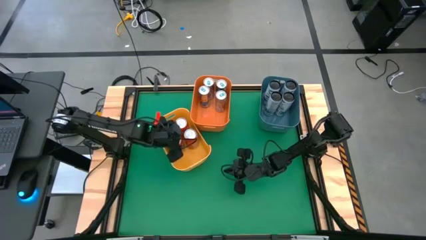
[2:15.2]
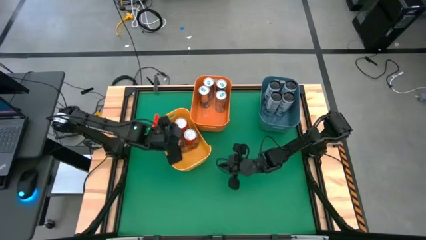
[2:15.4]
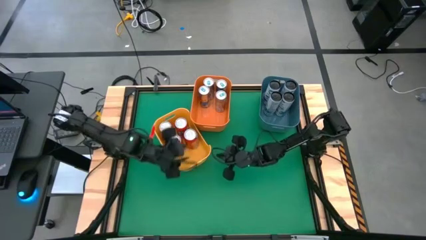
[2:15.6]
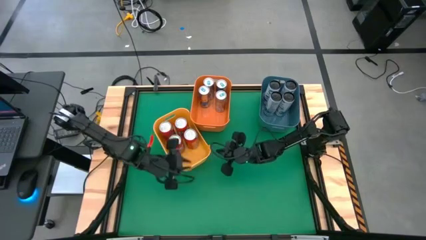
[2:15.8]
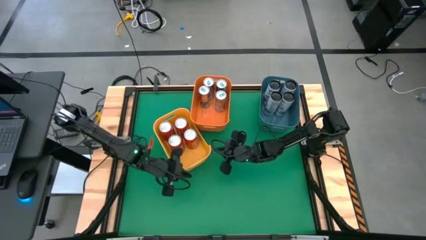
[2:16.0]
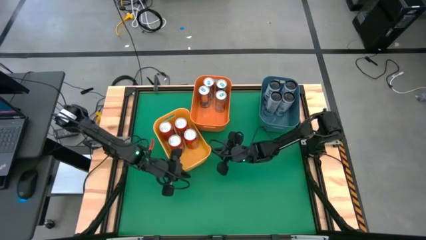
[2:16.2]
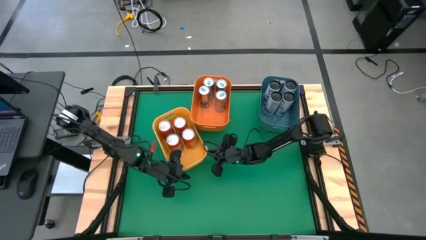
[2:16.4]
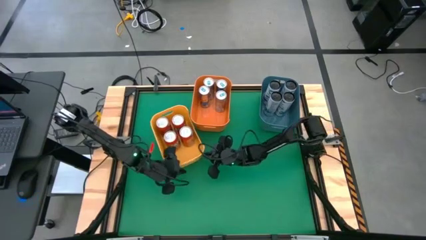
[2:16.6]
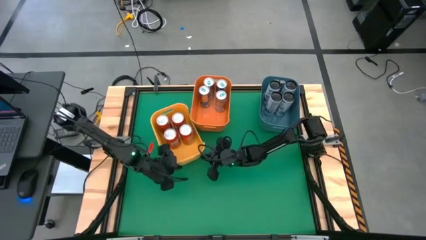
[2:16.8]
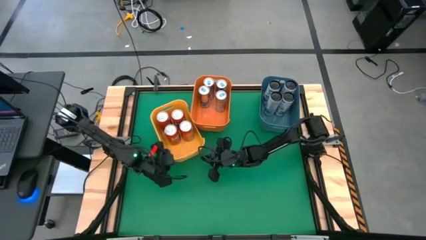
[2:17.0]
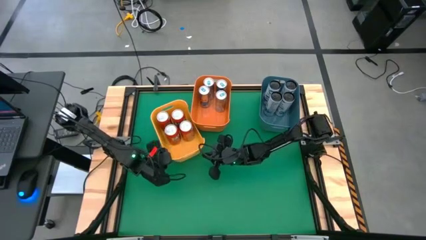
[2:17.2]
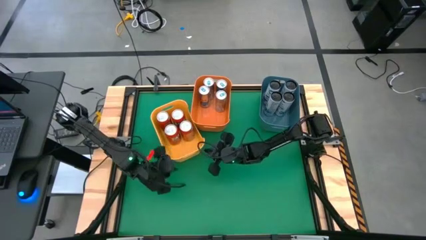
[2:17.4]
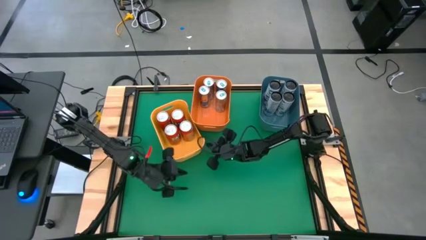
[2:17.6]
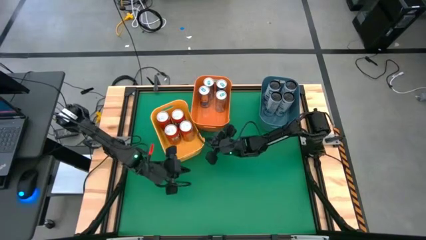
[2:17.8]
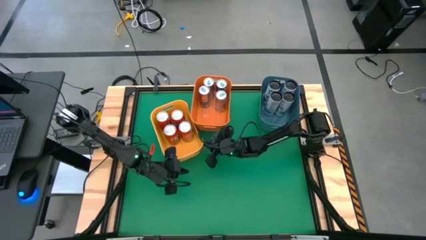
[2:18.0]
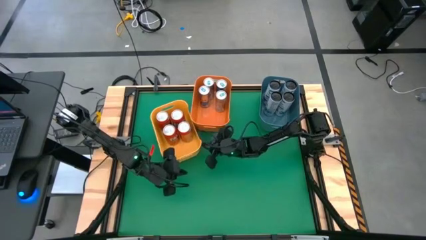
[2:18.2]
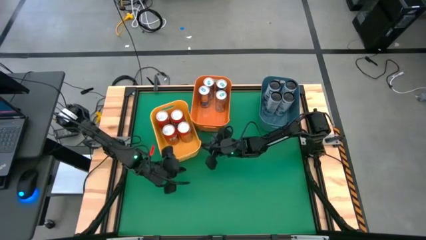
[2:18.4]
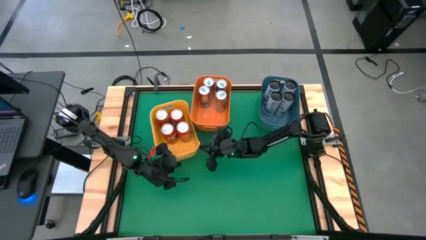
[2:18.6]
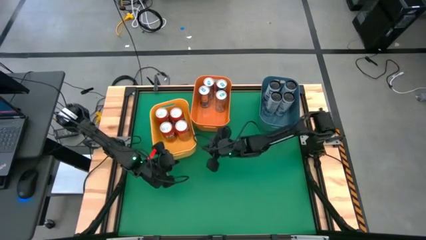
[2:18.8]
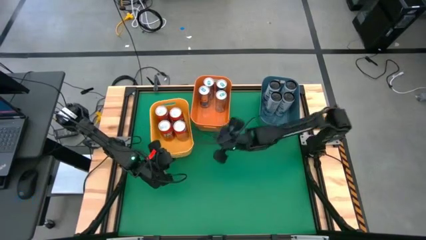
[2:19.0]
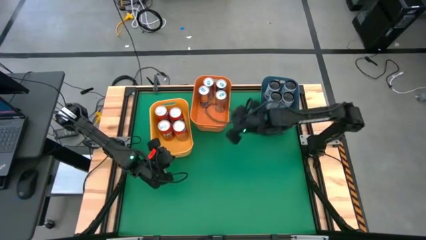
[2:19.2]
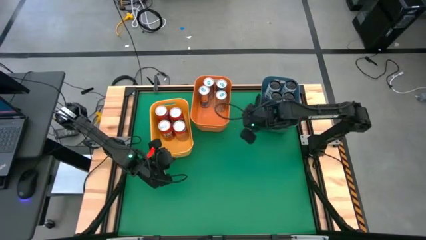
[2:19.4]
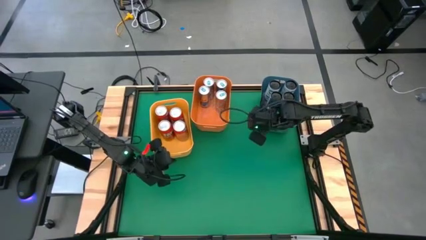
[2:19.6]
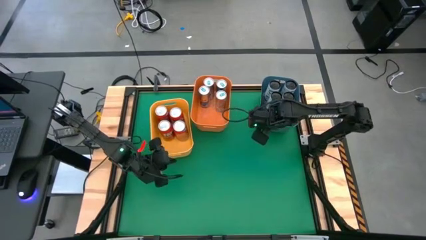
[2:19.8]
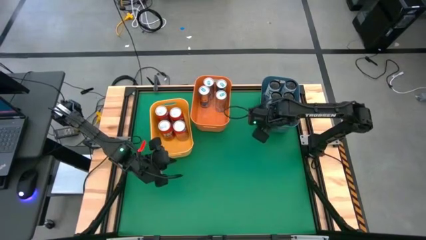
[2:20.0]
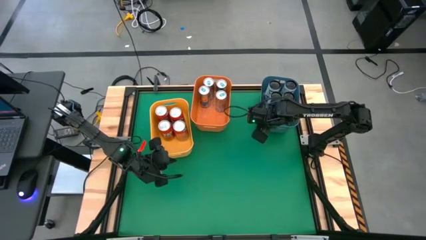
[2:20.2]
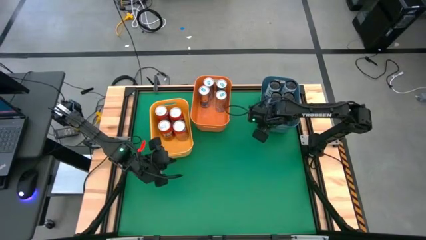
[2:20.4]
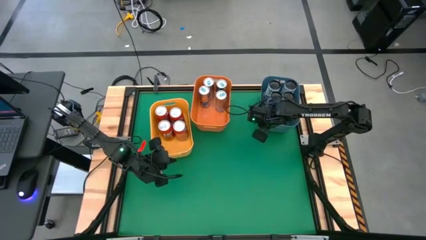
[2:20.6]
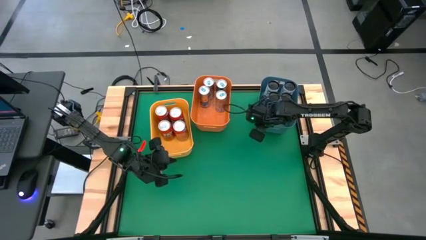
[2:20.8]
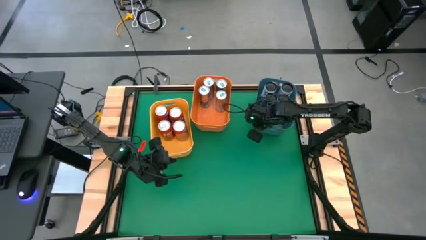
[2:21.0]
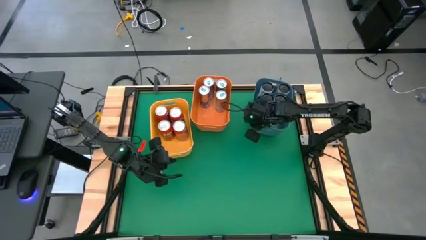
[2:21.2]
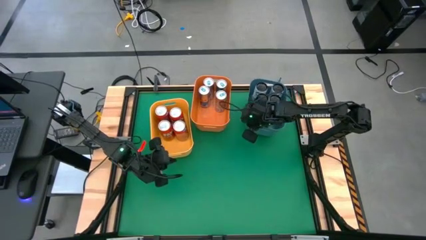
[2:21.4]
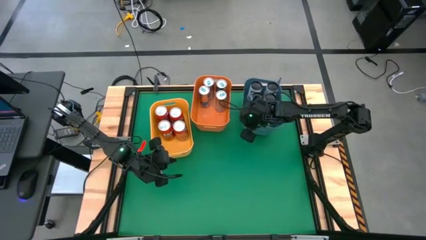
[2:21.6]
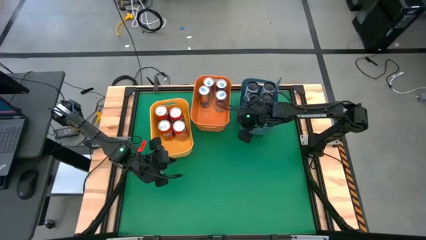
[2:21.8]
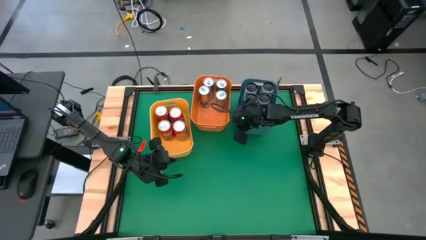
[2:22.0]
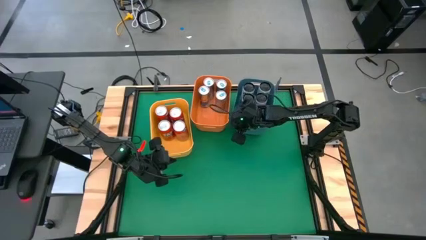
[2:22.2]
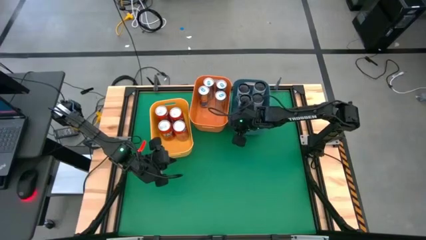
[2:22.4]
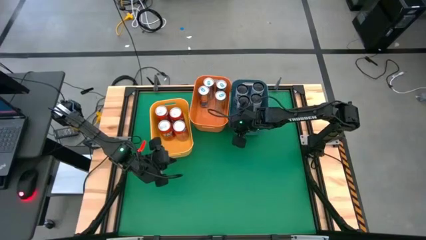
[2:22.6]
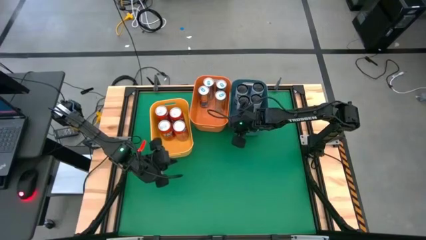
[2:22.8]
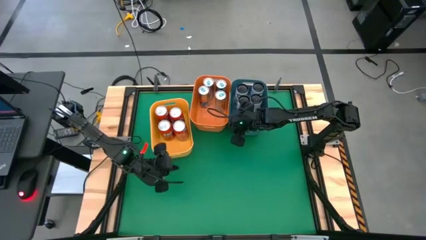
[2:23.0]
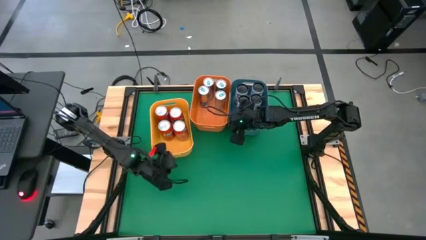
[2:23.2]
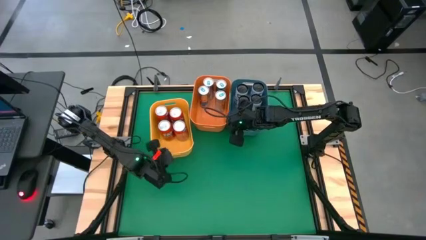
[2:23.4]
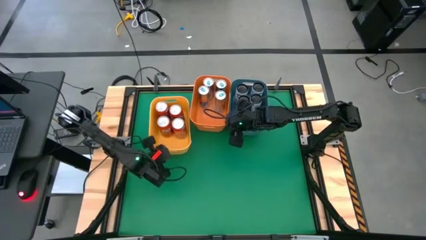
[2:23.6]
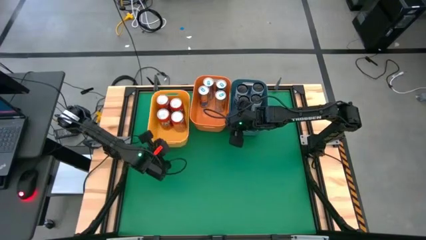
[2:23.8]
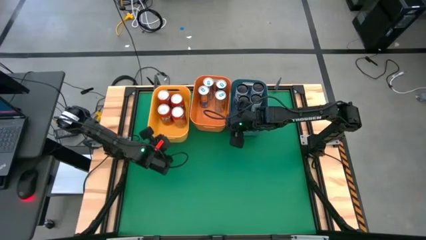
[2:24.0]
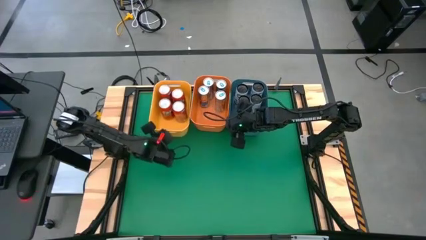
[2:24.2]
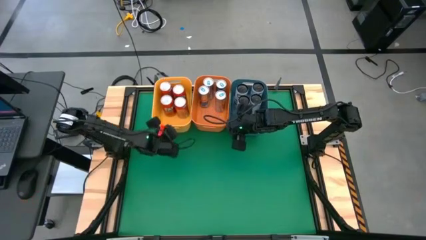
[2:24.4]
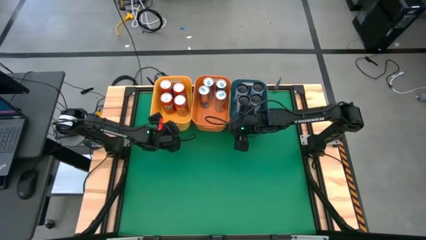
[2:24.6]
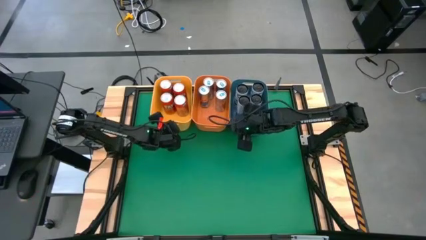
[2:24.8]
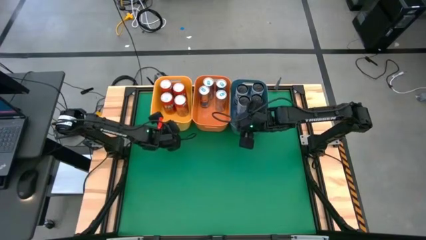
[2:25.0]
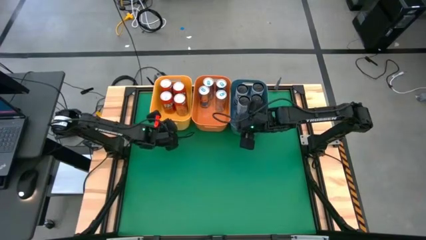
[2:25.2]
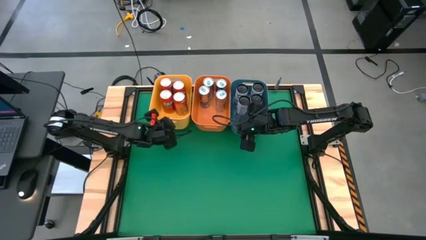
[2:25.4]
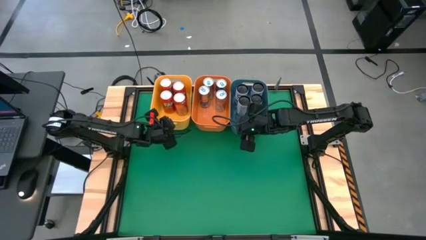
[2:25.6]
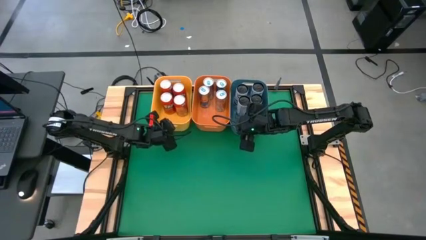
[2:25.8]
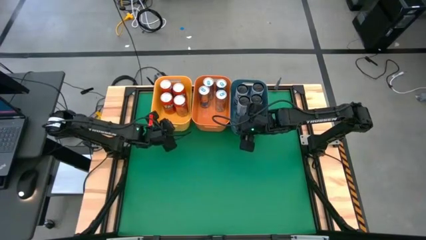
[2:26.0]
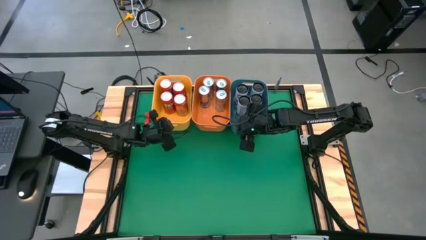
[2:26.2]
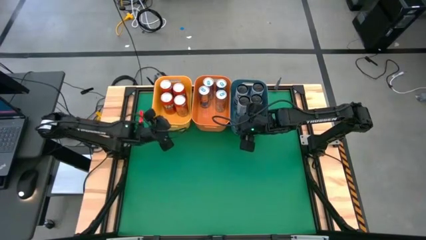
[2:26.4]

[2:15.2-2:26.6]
Task: Sort soda cans
Adjust the bins

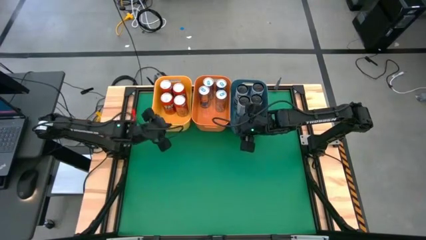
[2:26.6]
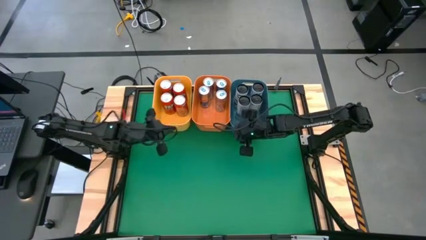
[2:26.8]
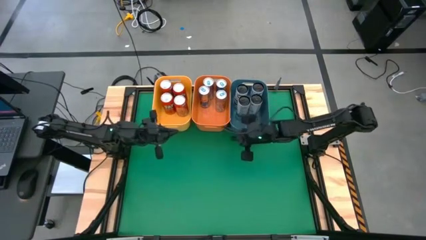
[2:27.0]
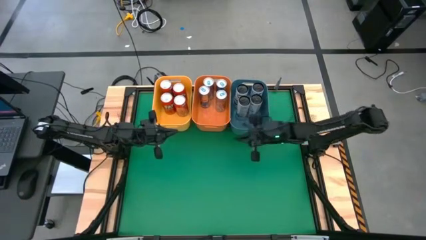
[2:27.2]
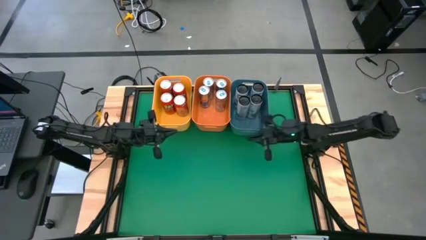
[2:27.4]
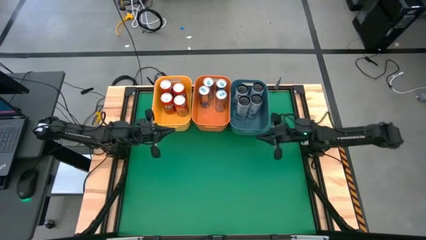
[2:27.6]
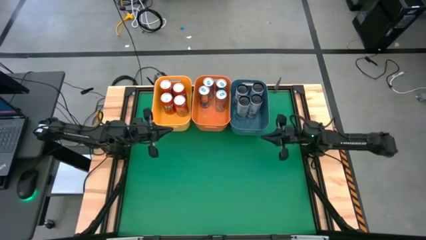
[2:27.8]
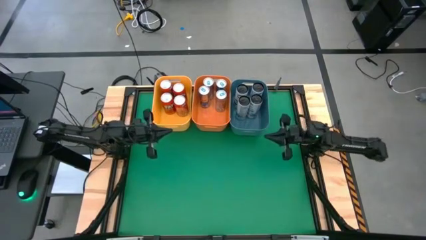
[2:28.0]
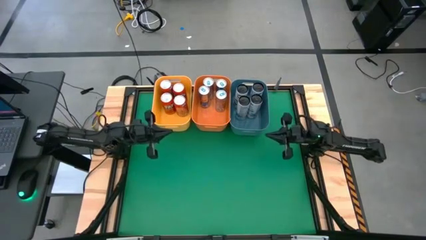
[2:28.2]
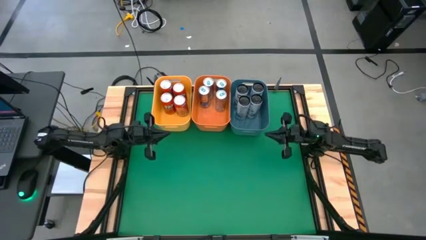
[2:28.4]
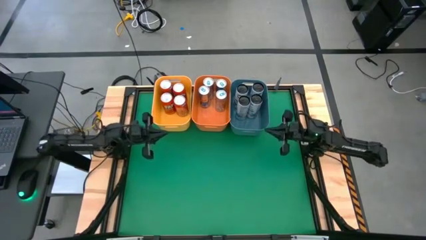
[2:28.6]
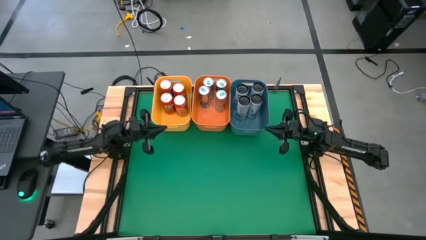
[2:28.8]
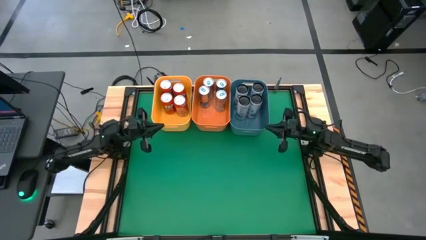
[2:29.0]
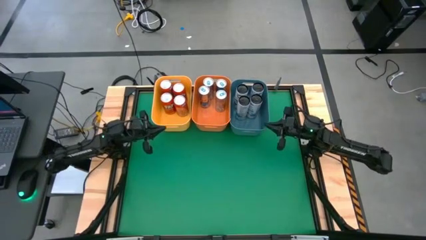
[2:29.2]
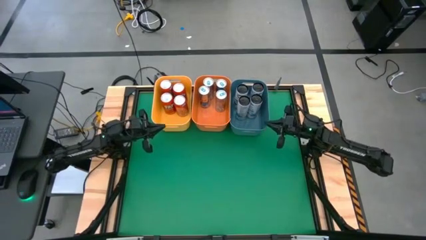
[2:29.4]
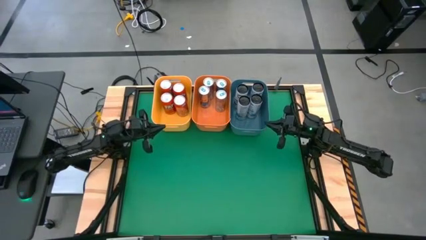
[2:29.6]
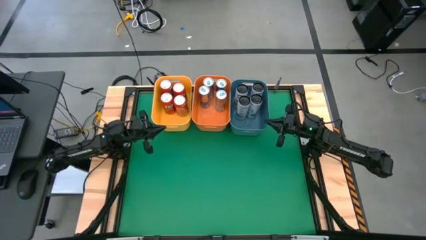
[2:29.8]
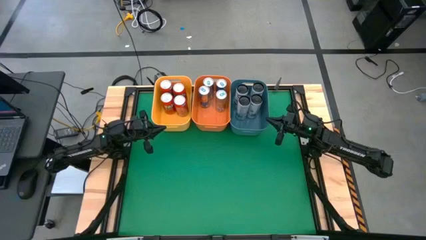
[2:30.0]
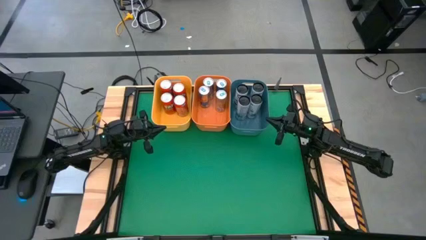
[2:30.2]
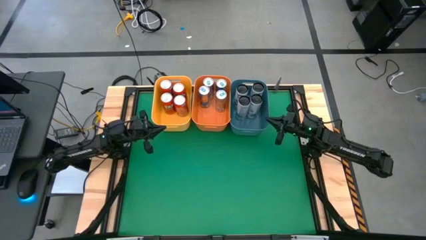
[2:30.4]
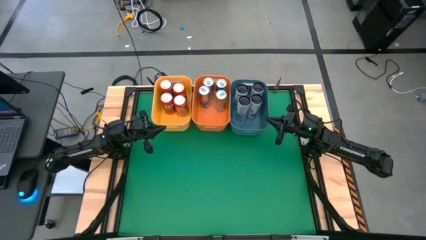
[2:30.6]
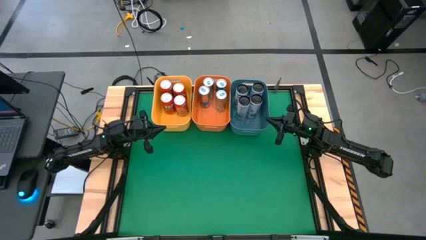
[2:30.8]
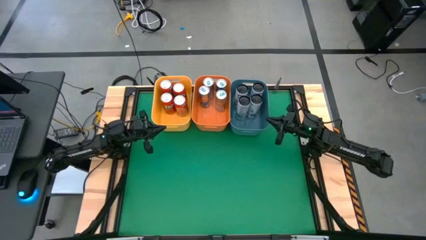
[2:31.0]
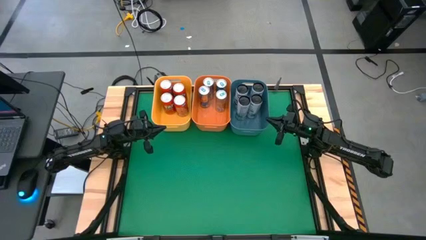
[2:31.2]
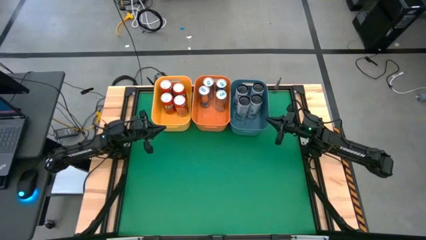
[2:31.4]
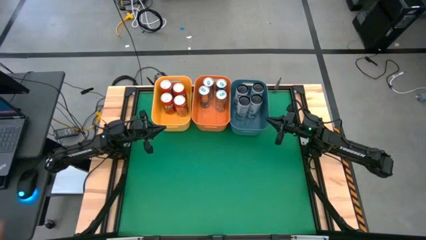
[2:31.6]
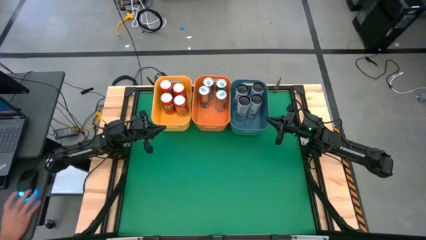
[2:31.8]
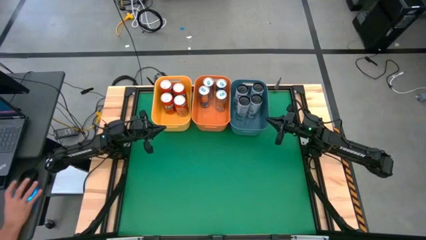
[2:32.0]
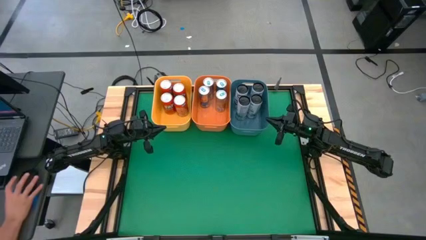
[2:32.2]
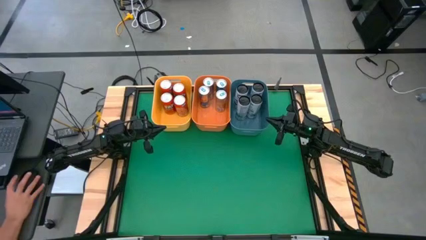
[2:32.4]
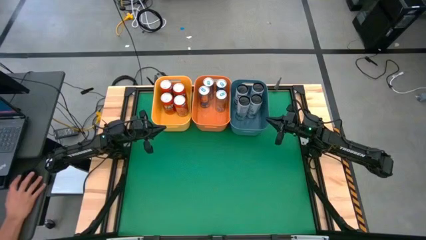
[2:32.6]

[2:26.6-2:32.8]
Return to Home Position
